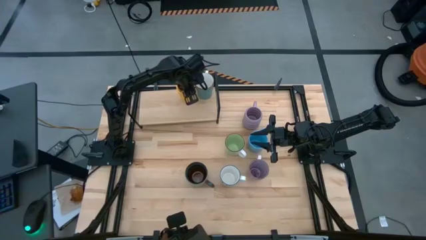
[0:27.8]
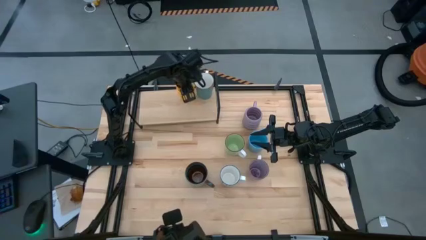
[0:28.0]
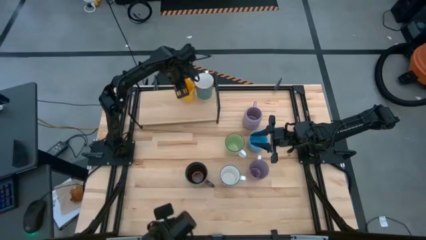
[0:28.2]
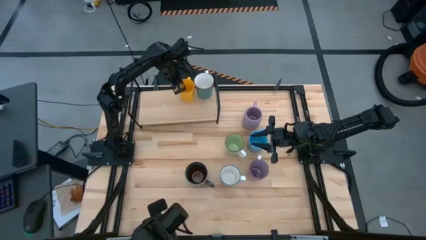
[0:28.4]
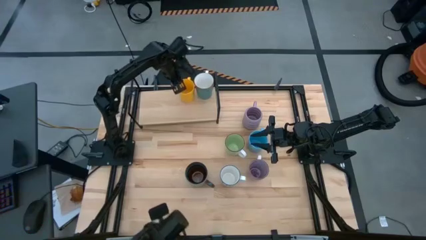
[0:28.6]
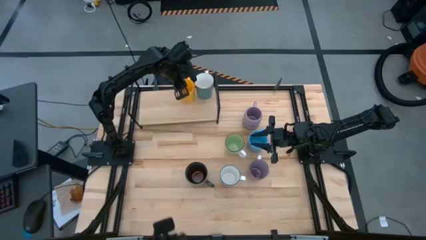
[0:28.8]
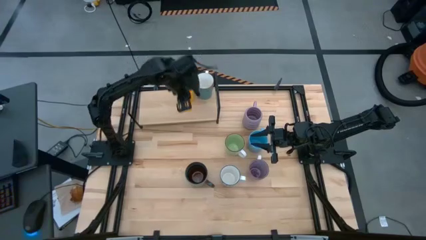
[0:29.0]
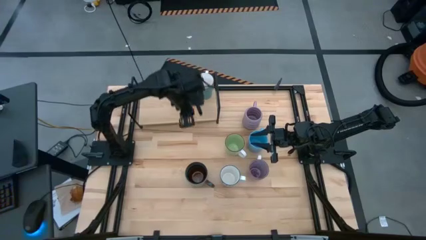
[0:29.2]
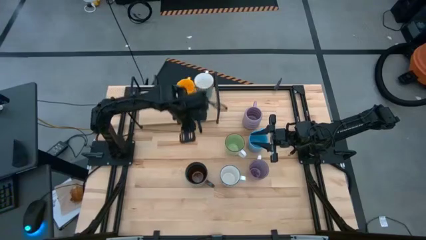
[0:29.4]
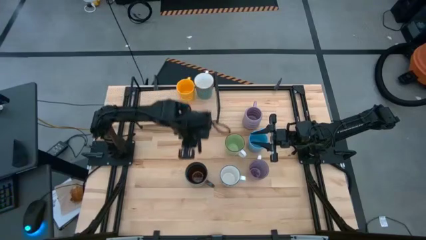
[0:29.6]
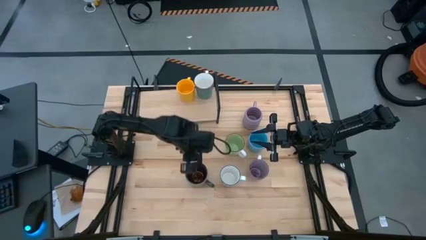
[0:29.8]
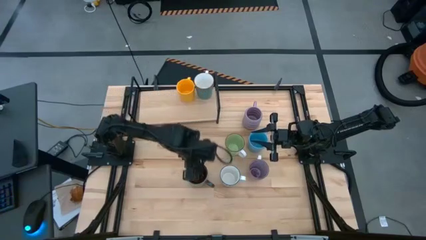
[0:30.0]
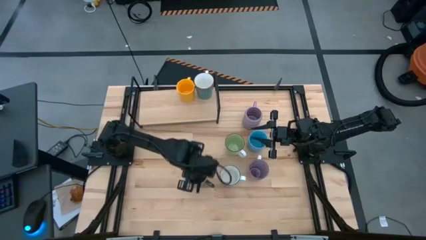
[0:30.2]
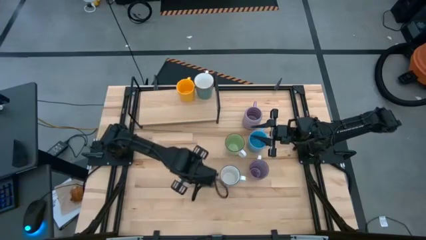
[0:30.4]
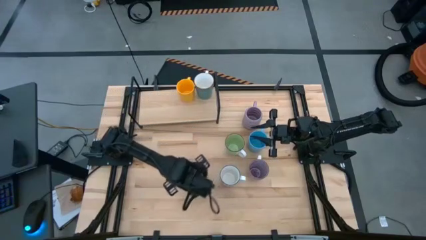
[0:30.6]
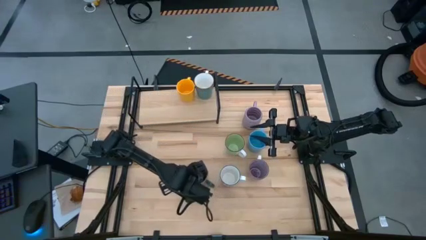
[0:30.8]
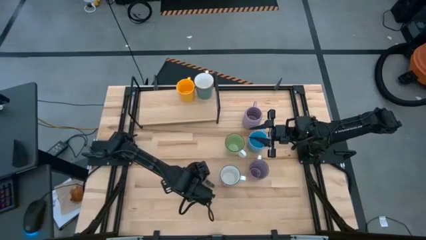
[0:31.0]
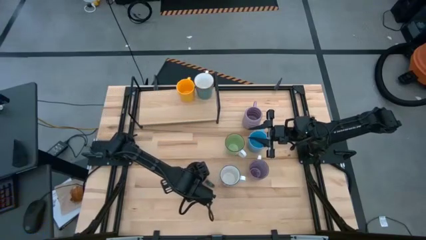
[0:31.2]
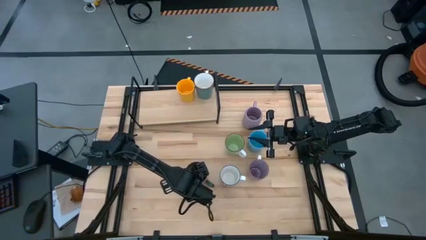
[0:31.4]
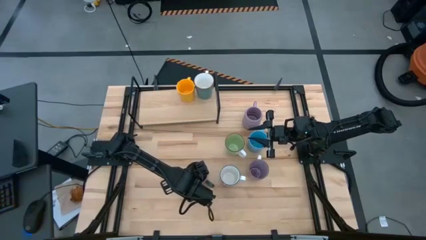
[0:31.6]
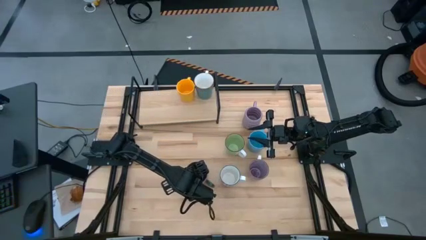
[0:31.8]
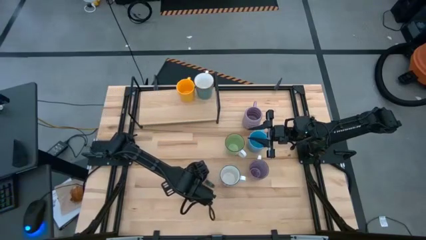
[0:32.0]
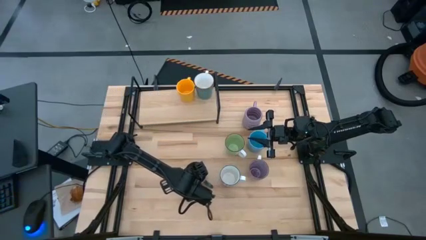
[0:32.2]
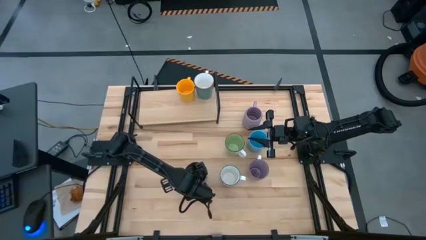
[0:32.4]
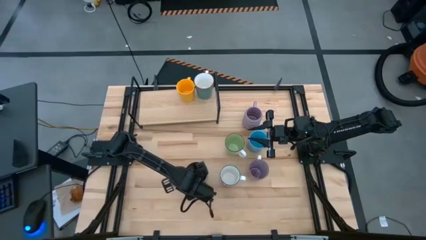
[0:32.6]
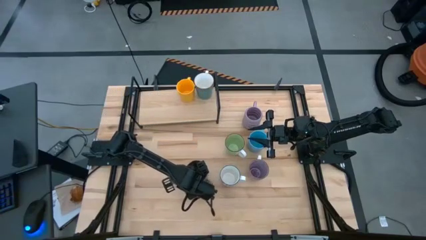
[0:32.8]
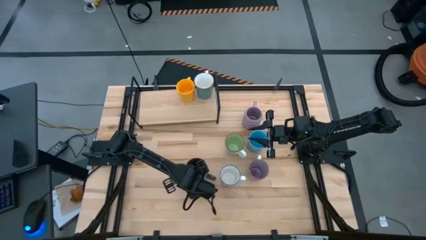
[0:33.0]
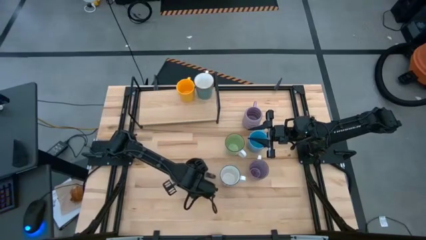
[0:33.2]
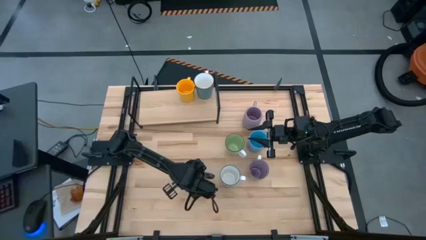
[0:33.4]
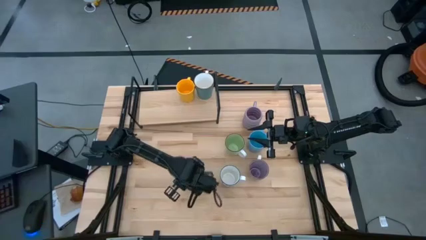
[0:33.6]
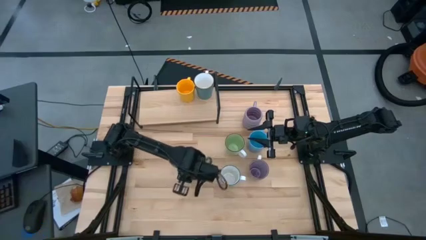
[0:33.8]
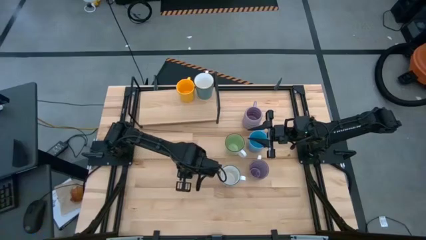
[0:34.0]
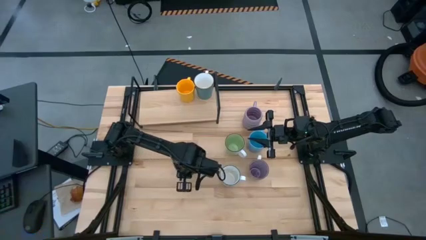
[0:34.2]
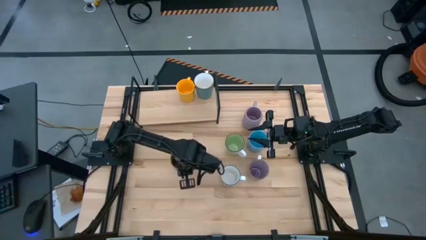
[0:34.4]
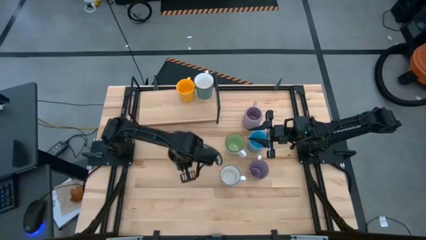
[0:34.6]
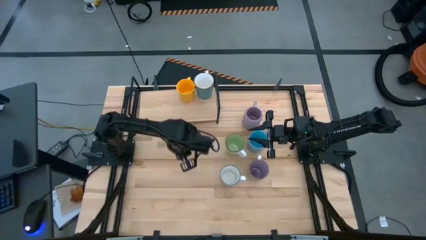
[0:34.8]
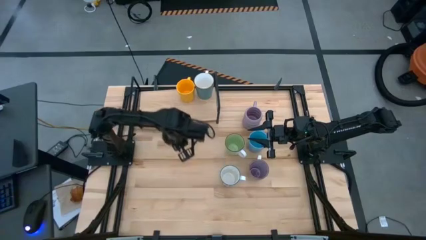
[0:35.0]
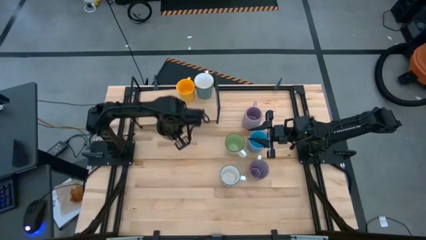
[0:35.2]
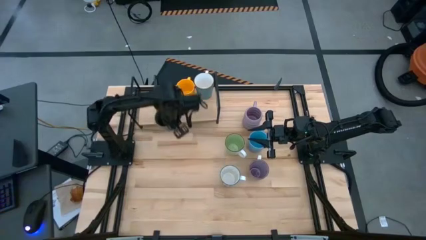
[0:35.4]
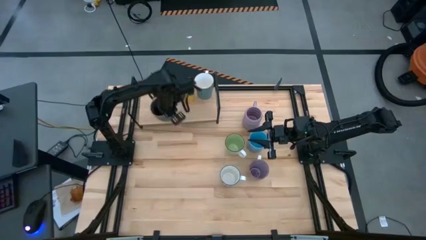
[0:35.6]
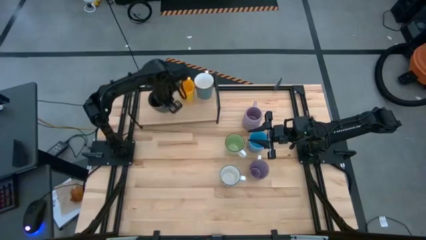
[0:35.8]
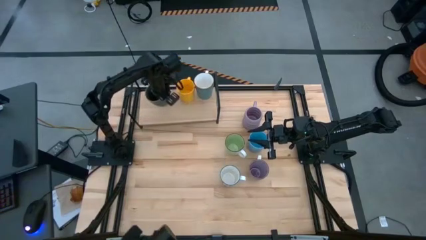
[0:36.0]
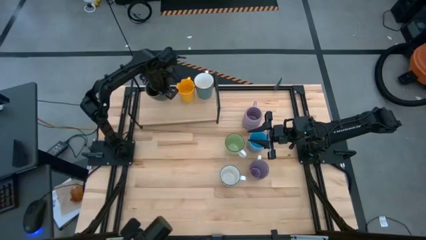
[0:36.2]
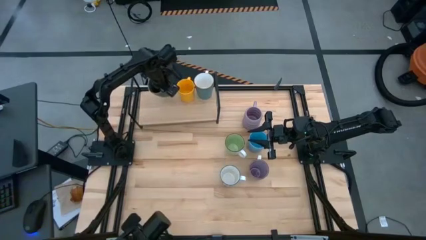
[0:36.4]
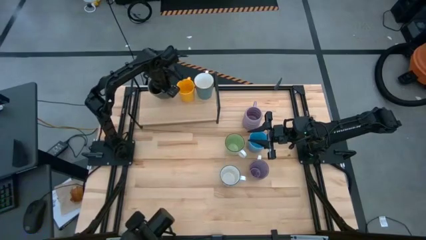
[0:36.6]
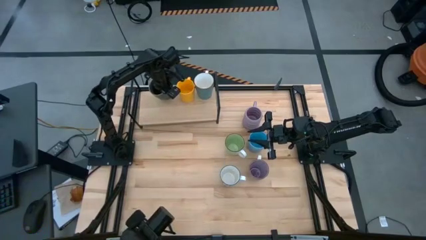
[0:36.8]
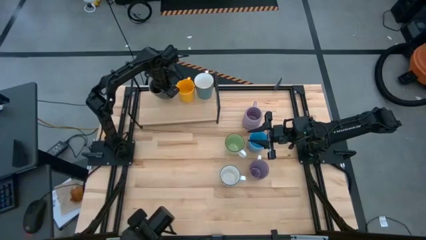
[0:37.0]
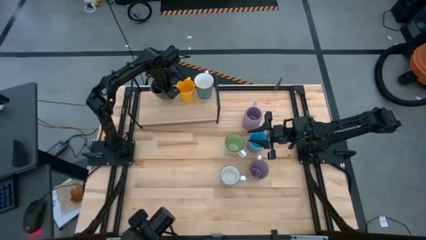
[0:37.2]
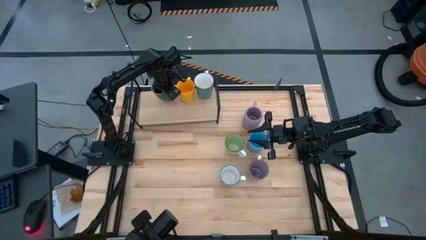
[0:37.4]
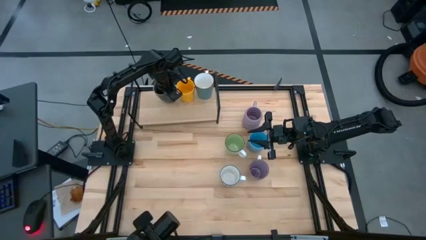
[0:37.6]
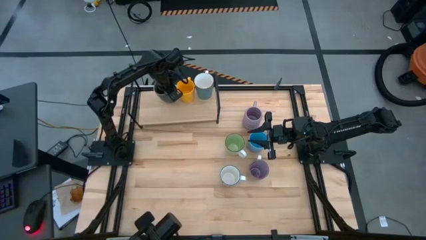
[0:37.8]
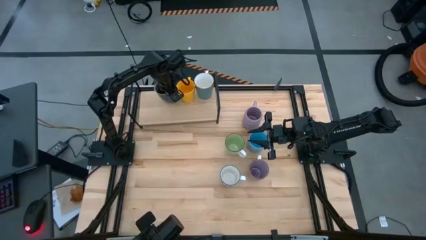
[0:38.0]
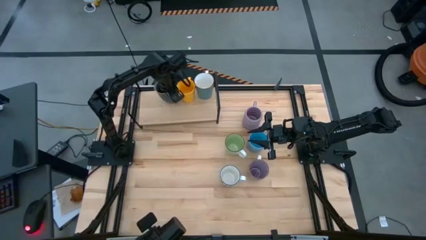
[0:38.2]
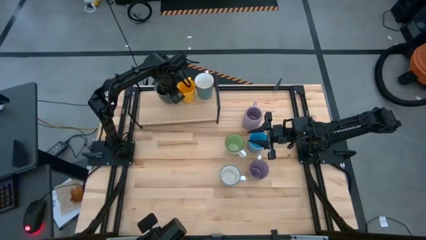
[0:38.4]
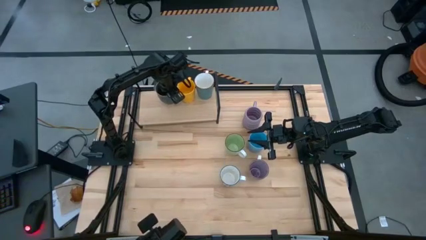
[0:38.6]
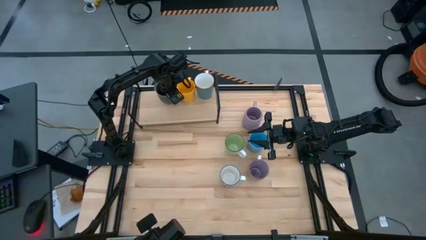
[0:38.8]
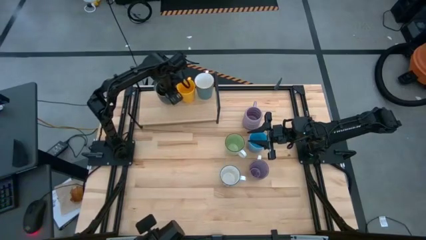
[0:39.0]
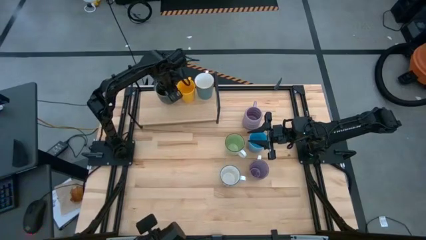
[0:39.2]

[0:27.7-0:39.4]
Task: Place coffee mugs
Put the dark blue patterned mug on the shelf
